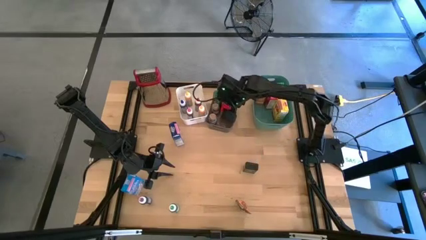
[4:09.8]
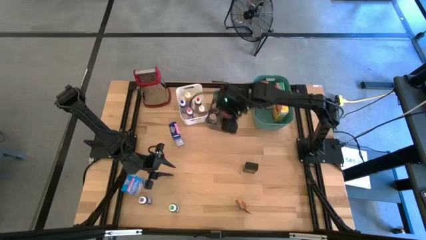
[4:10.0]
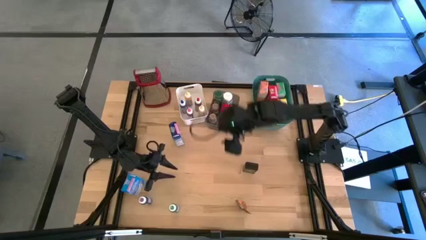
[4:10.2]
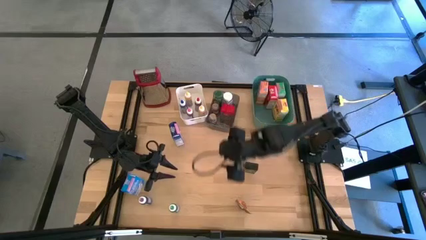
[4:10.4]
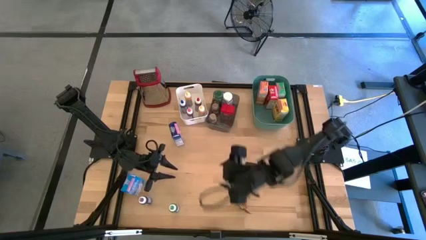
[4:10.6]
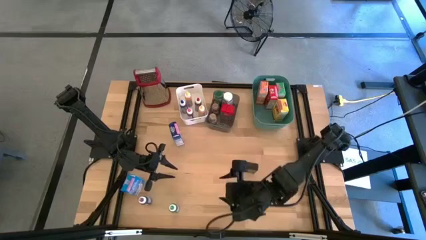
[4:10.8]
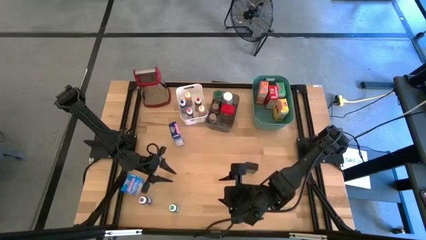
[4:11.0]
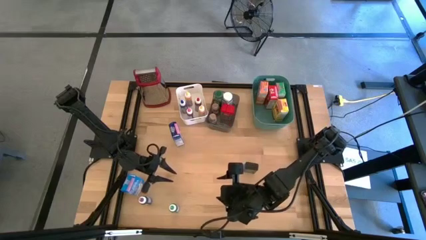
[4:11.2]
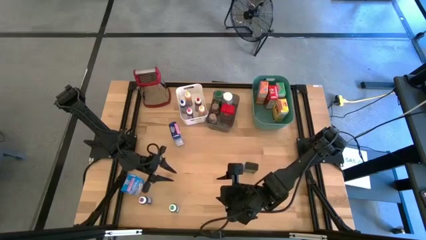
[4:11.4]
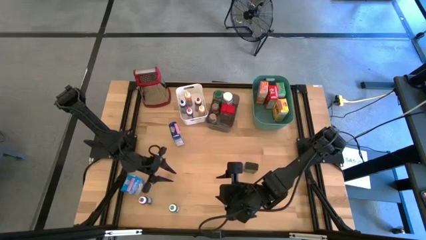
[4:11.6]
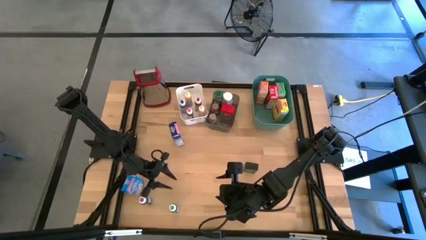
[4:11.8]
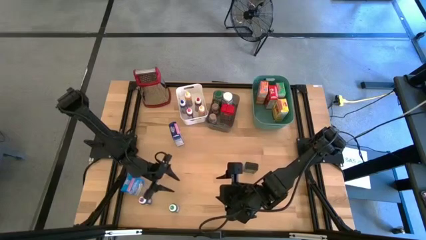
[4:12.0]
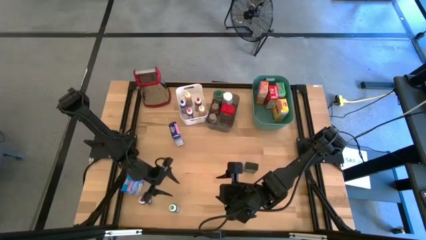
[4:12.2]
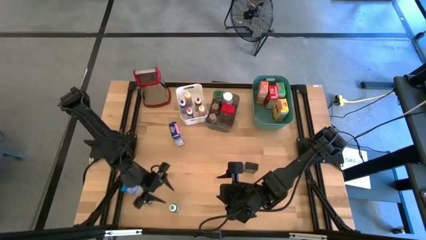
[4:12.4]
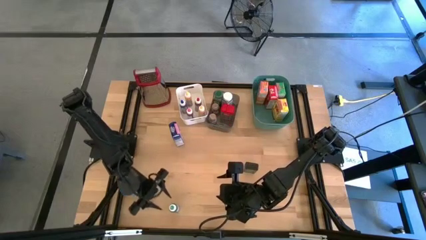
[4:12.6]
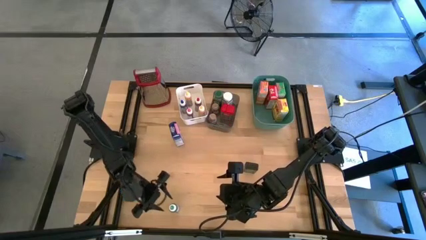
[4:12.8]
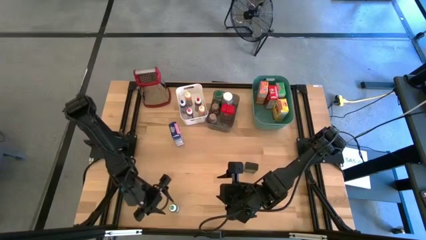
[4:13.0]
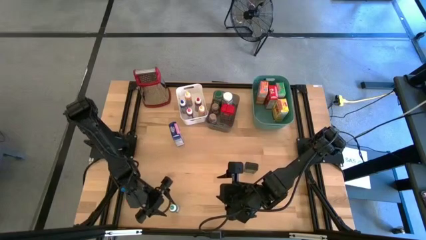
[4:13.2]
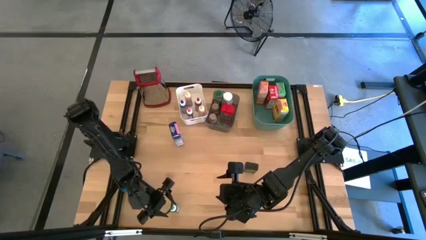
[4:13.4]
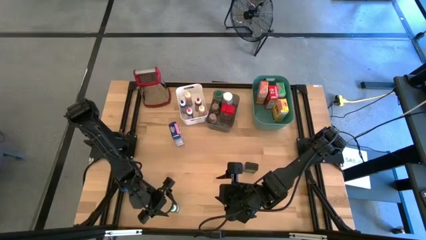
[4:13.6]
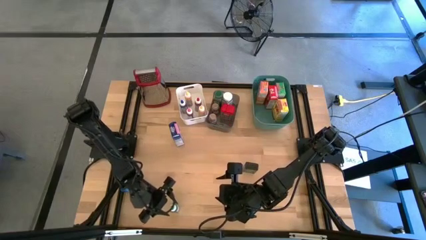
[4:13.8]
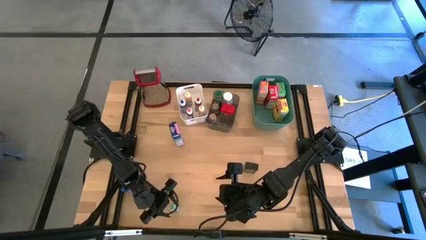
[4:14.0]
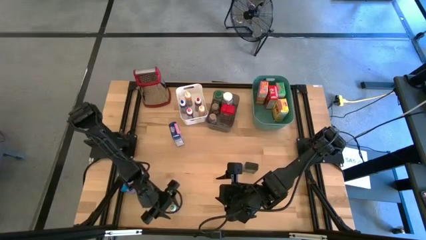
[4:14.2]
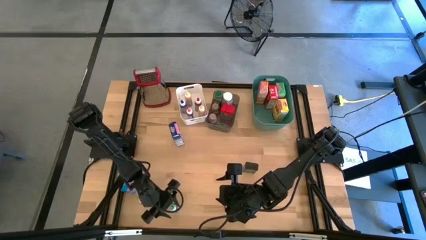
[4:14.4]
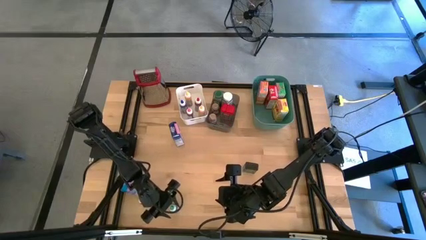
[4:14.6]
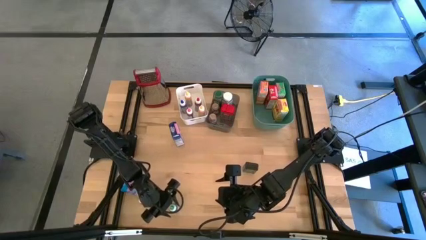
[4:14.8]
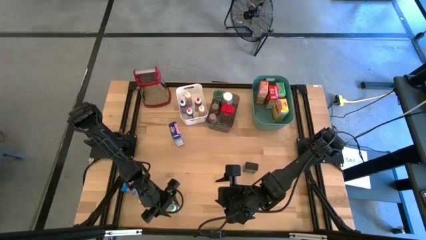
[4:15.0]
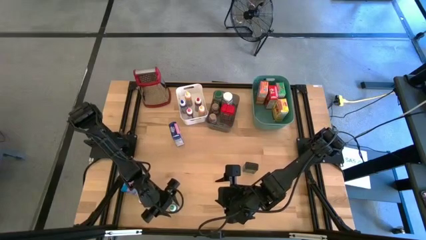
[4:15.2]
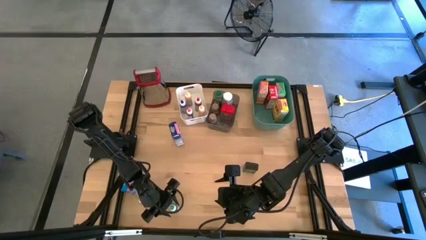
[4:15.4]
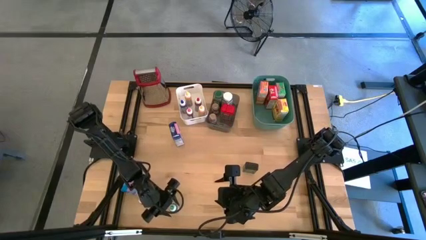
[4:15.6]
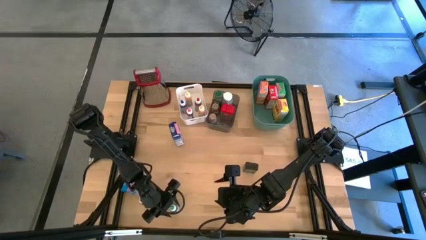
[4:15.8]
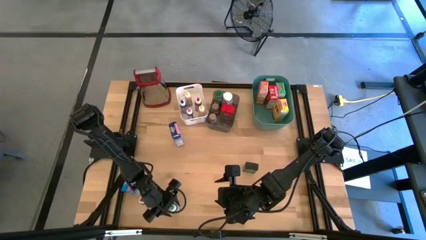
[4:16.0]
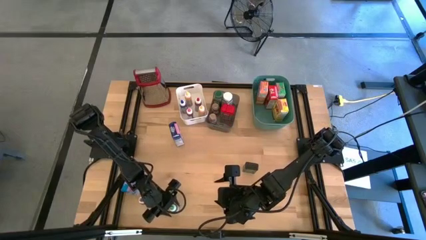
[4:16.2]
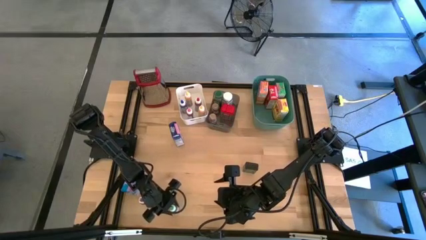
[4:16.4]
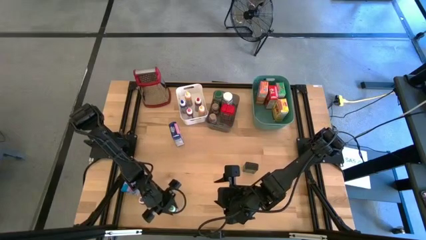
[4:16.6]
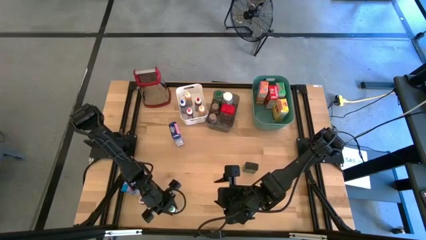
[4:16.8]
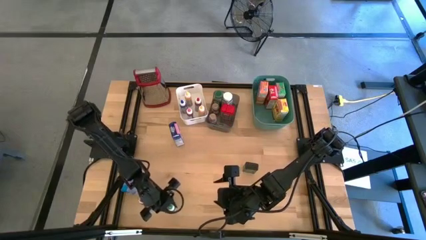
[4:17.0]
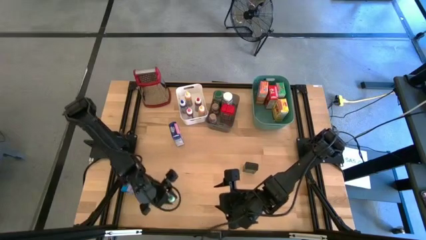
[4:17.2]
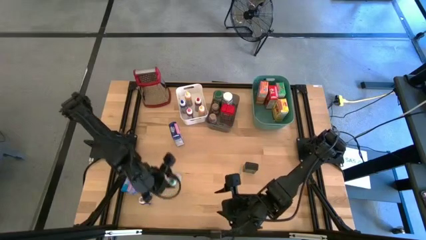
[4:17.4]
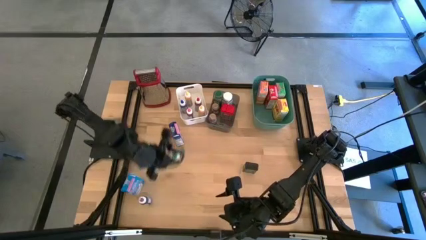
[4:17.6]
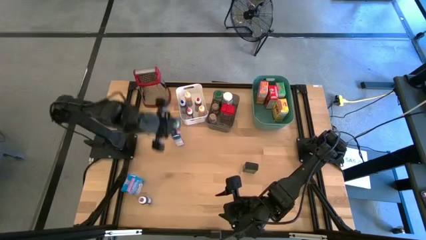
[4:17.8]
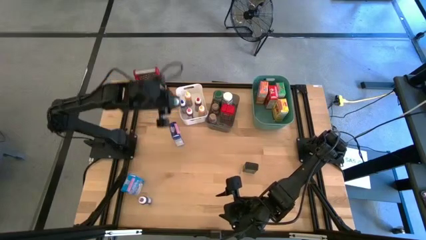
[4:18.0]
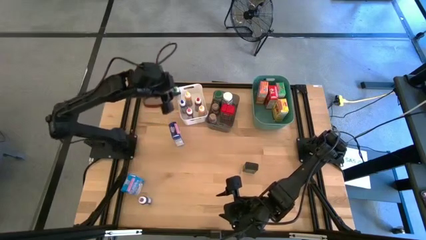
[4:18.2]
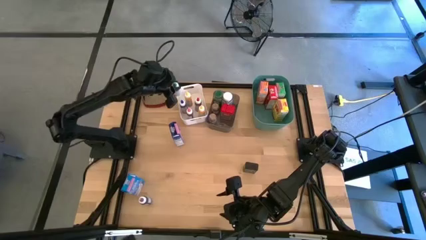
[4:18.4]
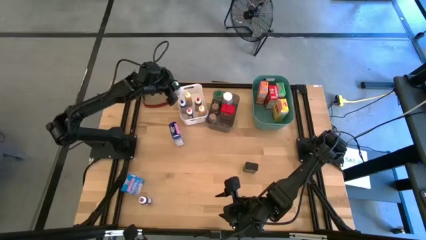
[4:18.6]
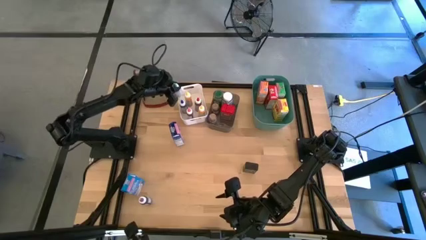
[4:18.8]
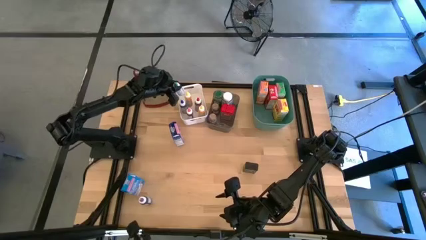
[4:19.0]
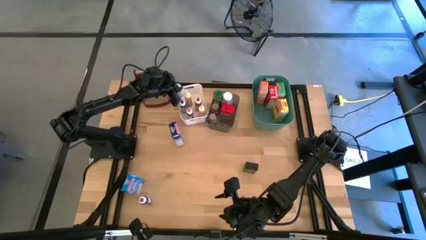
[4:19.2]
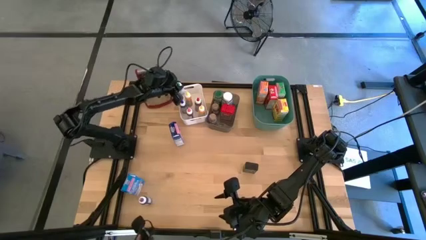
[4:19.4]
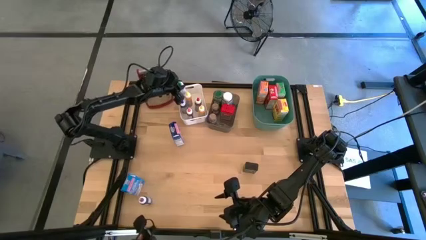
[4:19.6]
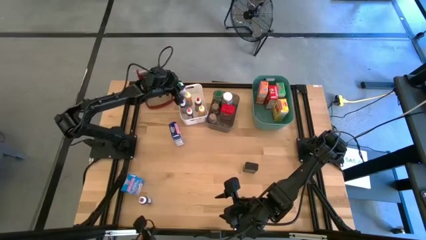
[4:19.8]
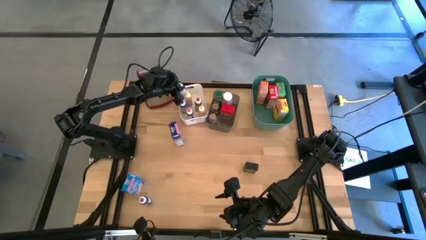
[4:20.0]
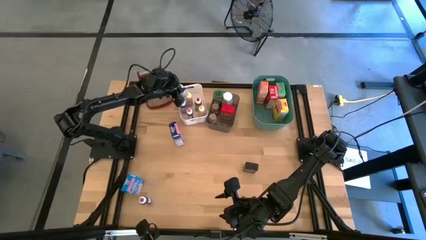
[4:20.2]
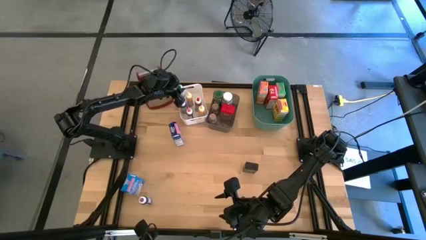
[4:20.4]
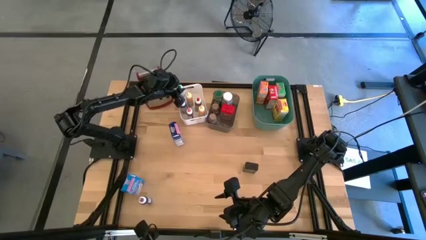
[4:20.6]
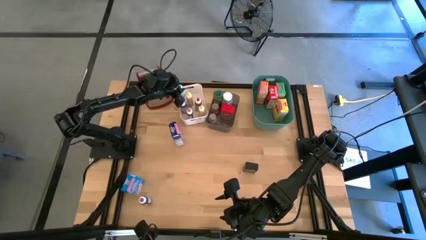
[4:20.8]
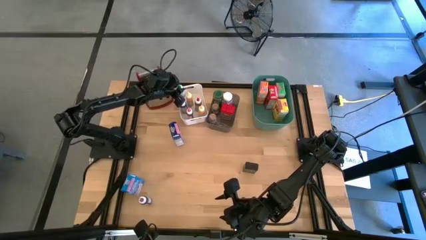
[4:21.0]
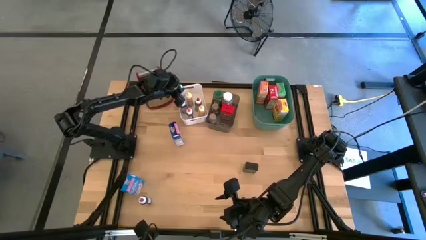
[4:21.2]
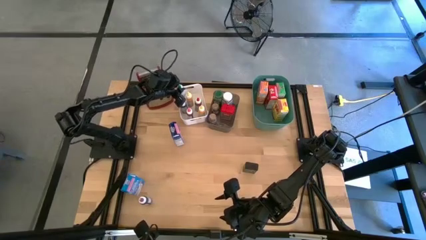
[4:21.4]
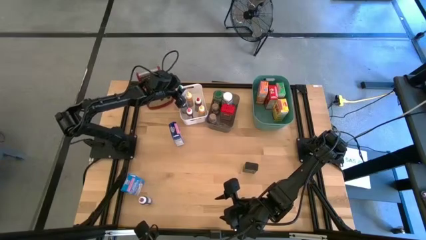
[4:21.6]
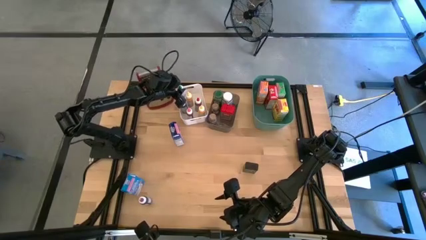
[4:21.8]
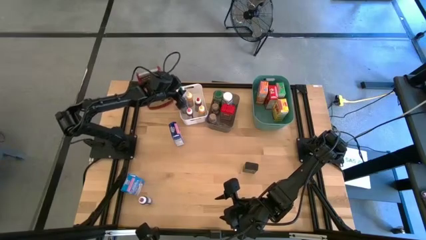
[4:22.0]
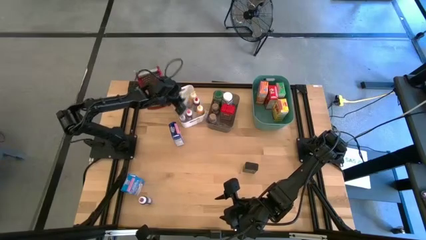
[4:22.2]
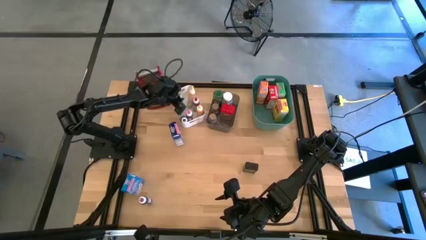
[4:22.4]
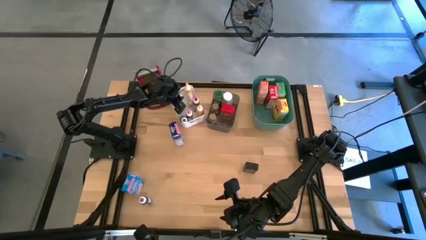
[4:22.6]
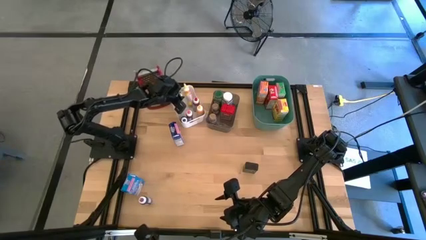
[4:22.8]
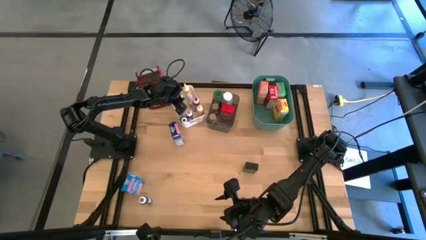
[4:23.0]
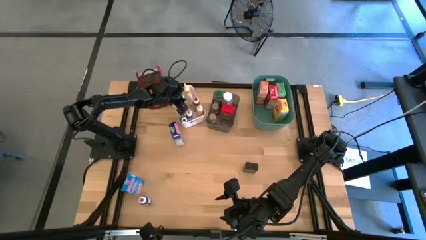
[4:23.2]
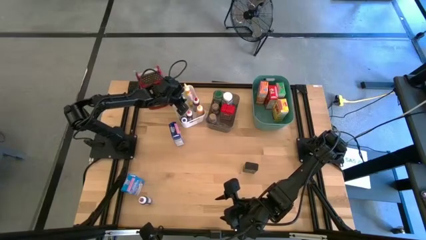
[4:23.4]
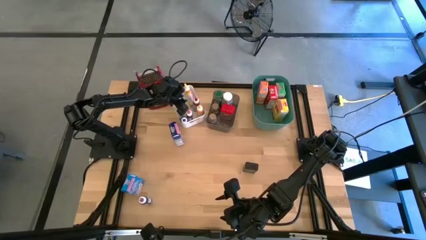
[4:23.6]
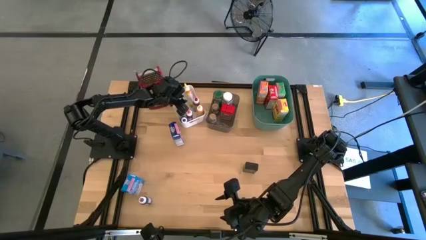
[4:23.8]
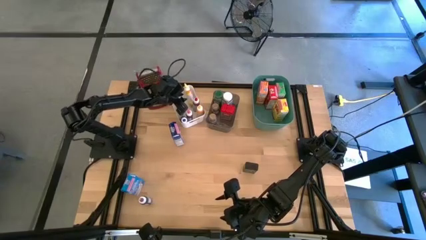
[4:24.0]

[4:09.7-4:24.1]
Task: Pick & Place Kitchen Items
Put the green food coloring into the white bin

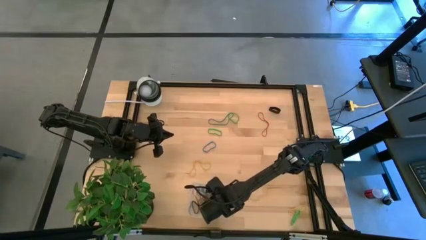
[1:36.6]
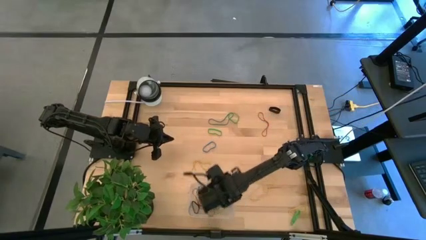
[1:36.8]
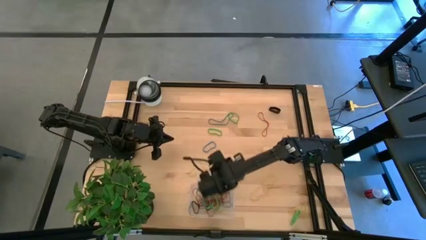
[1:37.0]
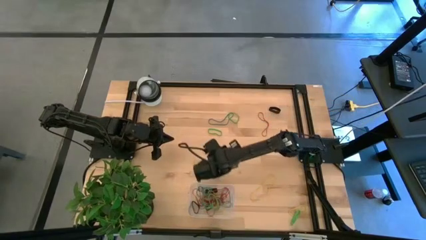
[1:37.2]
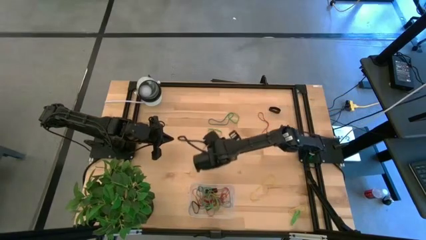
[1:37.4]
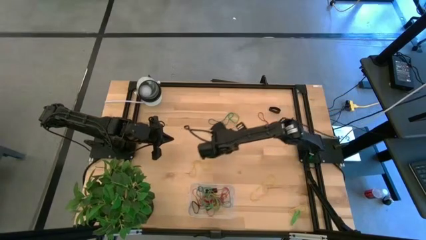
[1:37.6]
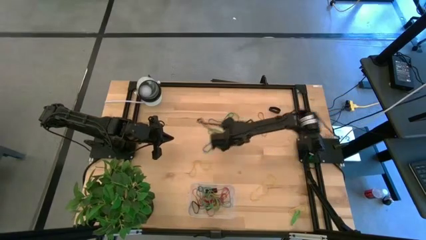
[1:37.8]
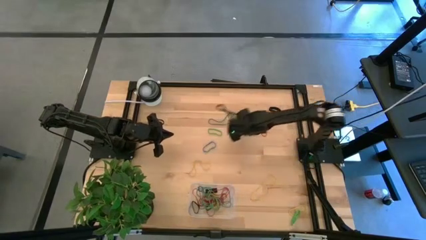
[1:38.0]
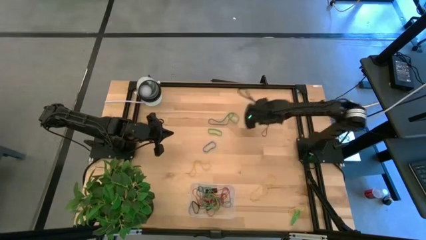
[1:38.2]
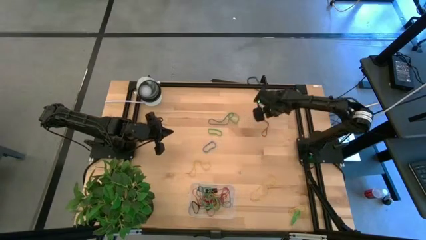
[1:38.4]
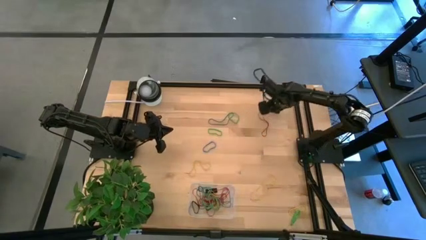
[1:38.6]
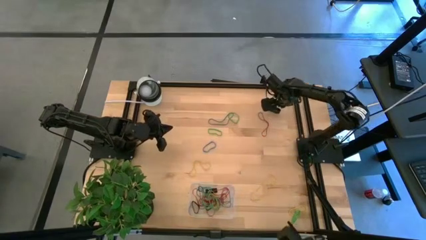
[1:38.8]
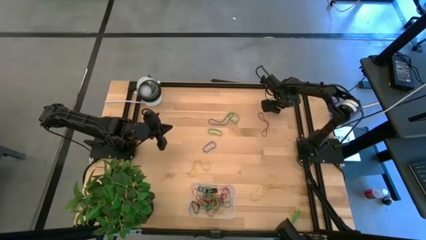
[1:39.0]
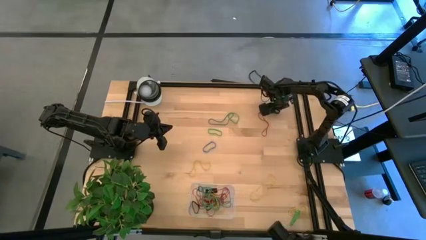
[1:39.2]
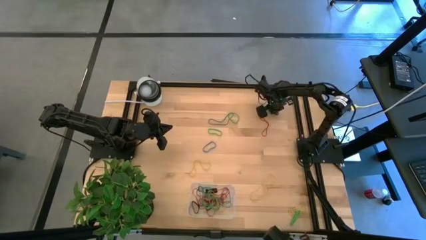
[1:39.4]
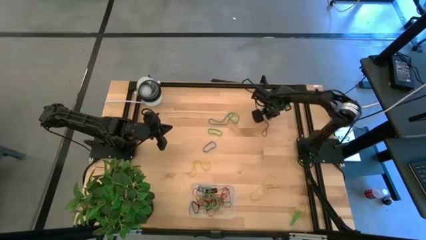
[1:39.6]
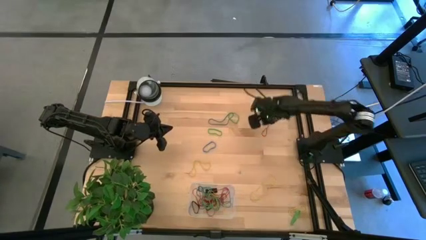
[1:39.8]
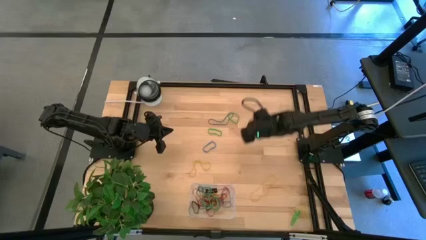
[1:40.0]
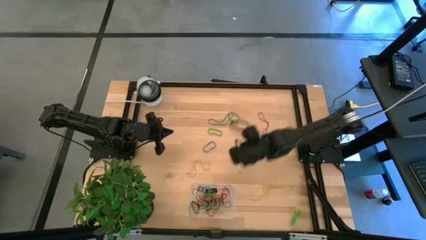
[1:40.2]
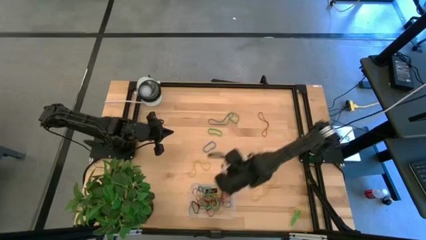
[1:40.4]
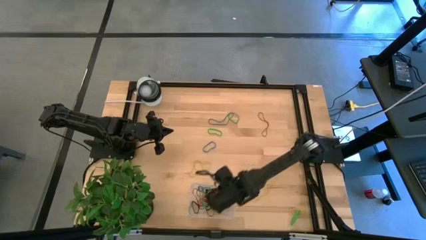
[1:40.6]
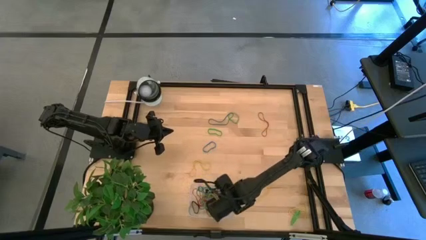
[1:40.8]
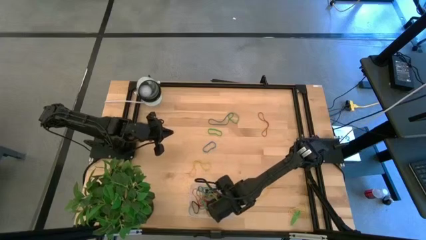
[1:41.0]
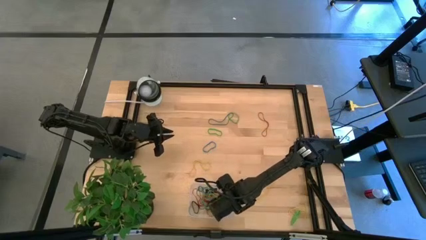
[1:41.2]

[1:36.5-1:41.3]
Task: Pick and place rubber bands into bin
Put the black rubber band into the transparent bin
